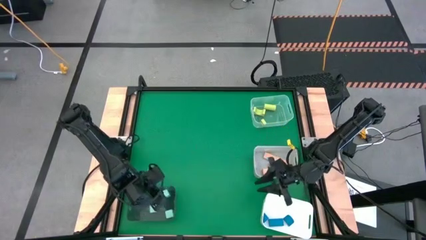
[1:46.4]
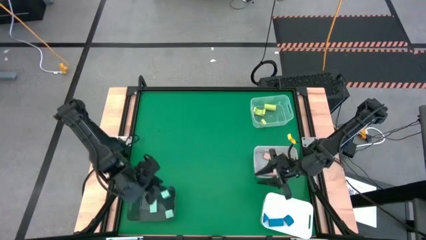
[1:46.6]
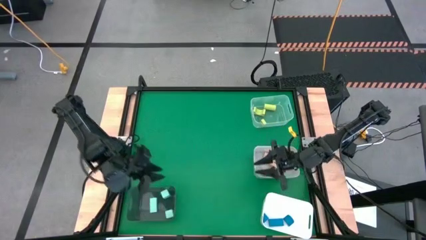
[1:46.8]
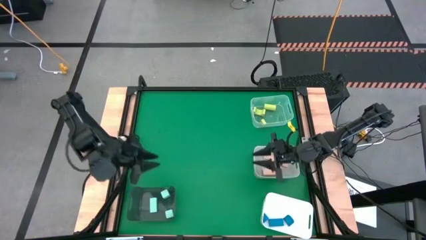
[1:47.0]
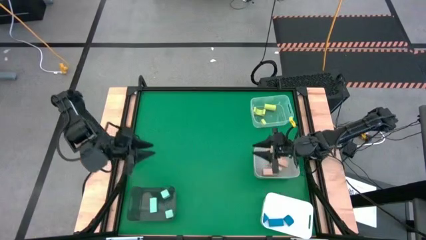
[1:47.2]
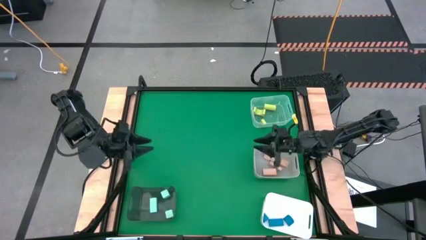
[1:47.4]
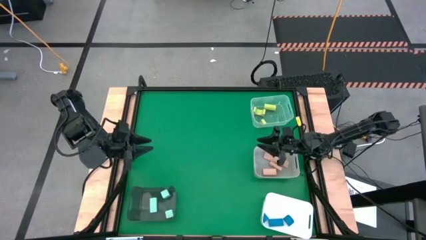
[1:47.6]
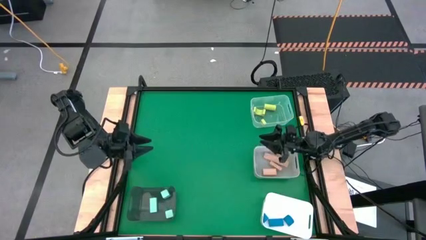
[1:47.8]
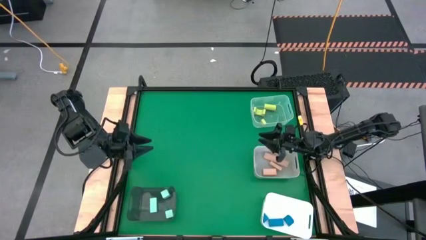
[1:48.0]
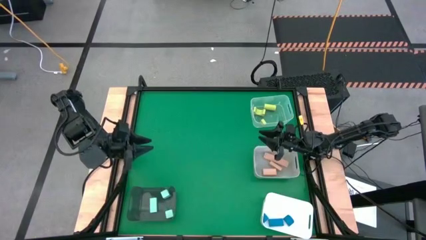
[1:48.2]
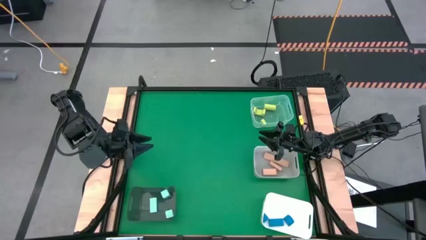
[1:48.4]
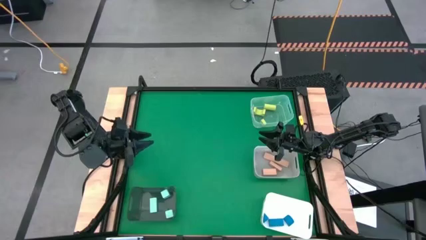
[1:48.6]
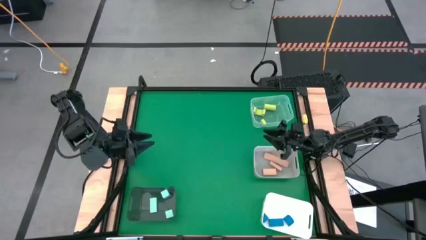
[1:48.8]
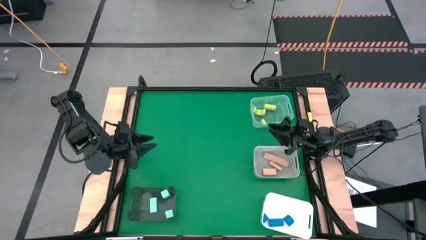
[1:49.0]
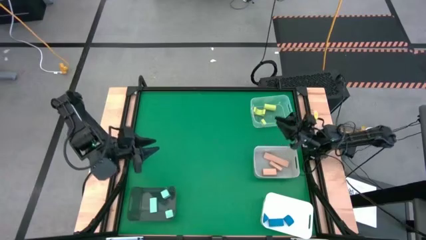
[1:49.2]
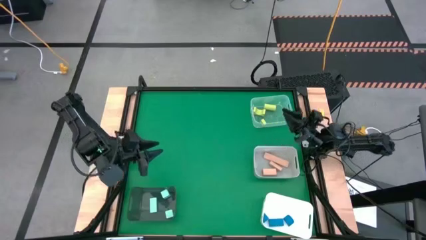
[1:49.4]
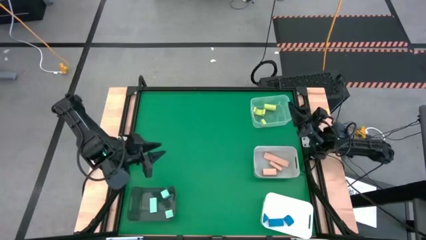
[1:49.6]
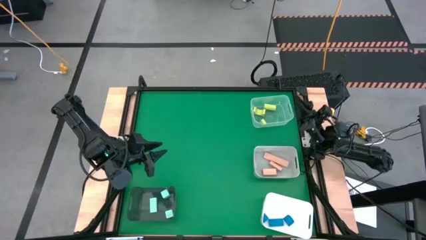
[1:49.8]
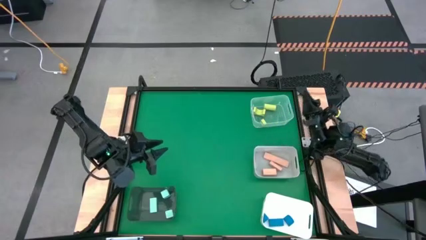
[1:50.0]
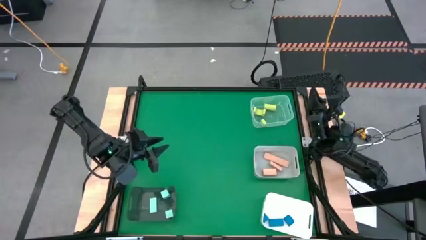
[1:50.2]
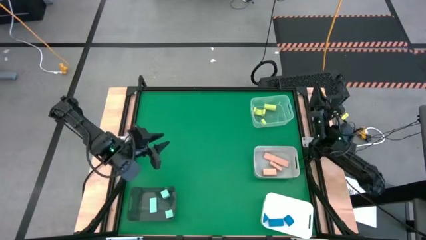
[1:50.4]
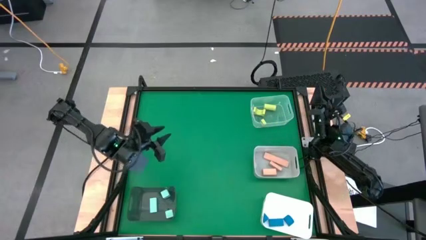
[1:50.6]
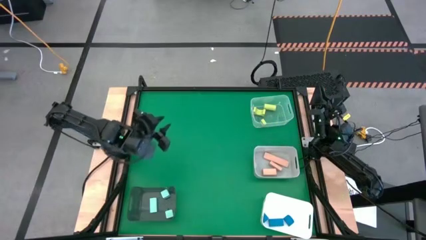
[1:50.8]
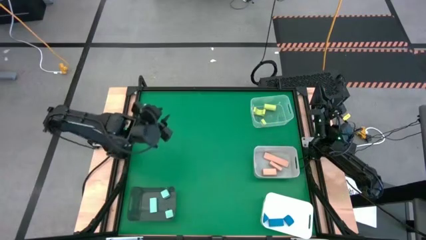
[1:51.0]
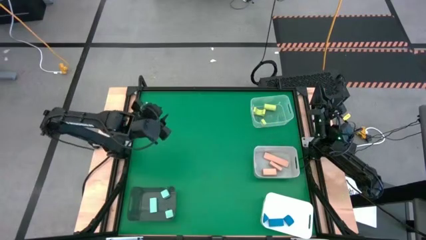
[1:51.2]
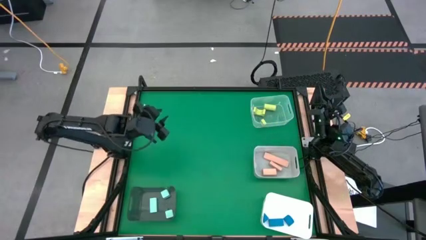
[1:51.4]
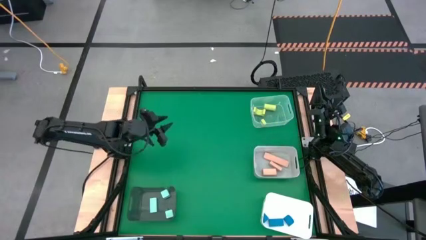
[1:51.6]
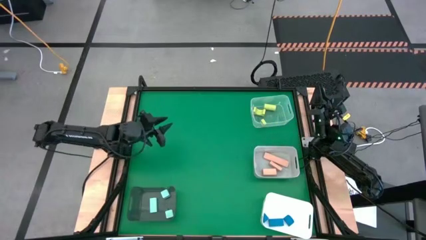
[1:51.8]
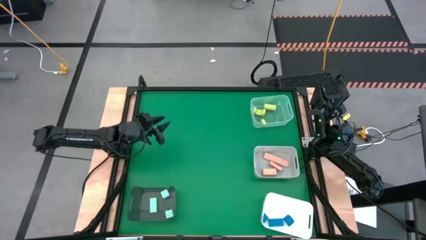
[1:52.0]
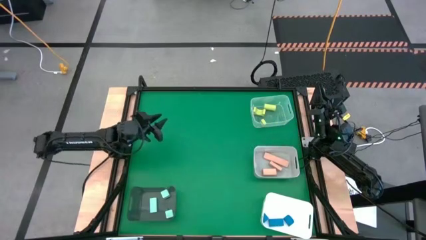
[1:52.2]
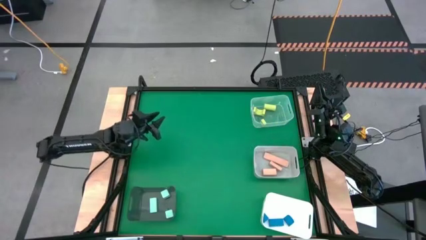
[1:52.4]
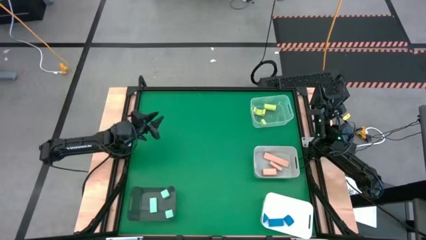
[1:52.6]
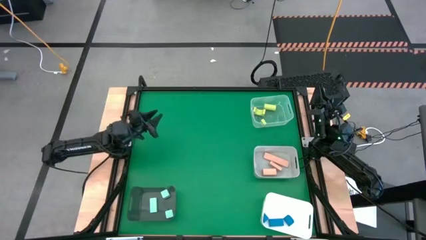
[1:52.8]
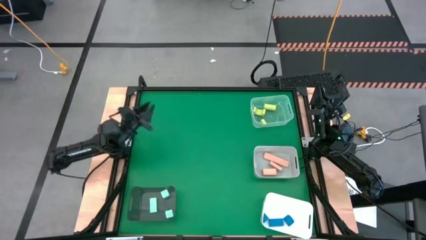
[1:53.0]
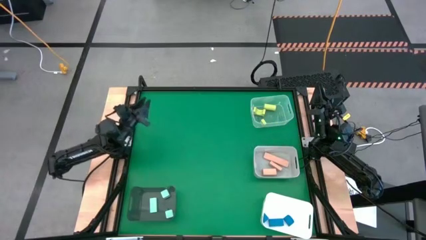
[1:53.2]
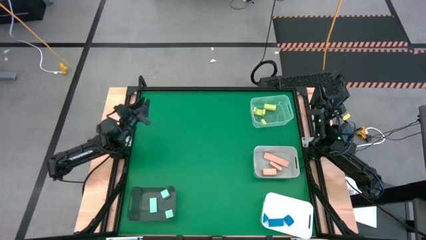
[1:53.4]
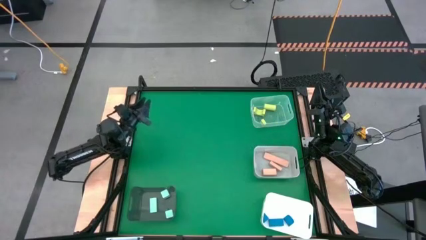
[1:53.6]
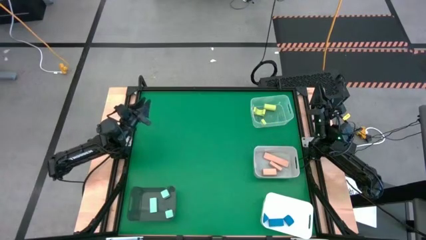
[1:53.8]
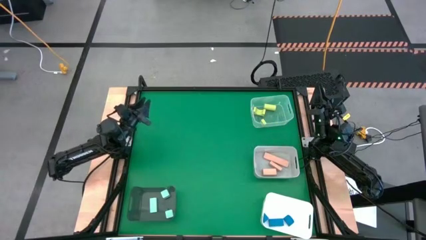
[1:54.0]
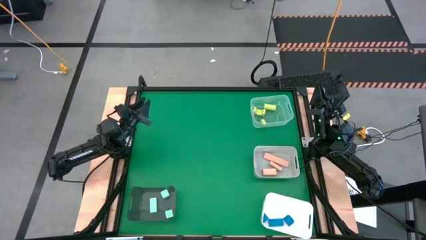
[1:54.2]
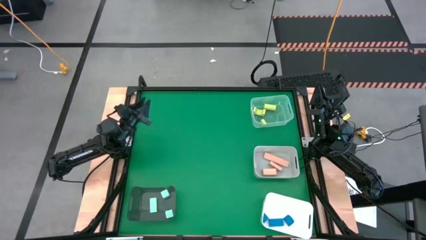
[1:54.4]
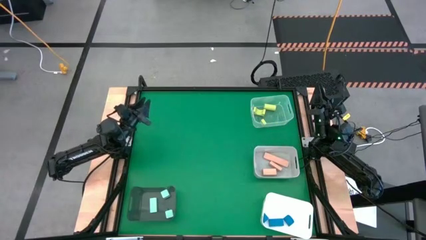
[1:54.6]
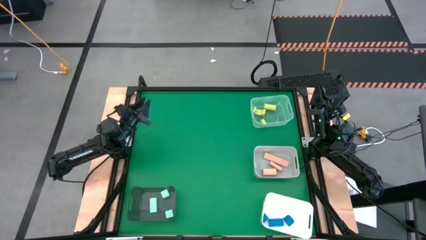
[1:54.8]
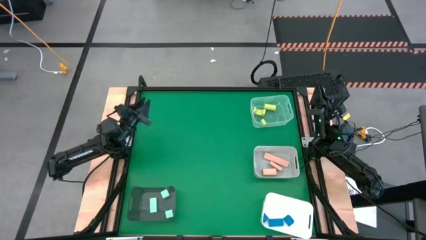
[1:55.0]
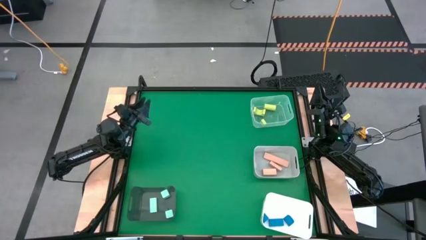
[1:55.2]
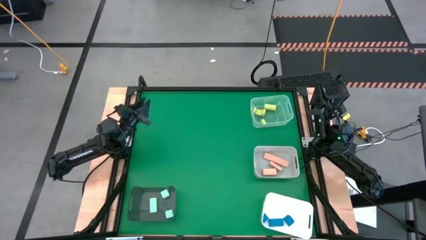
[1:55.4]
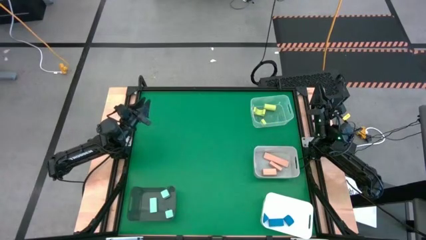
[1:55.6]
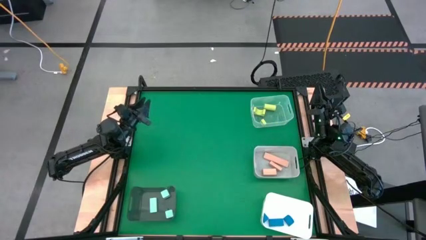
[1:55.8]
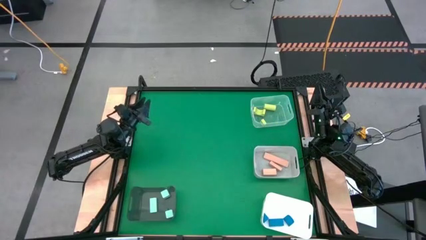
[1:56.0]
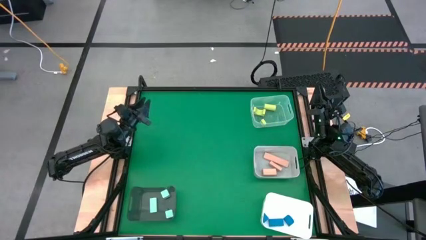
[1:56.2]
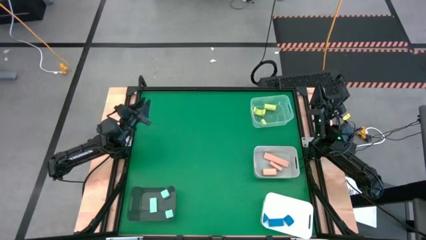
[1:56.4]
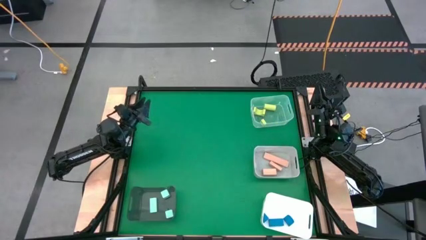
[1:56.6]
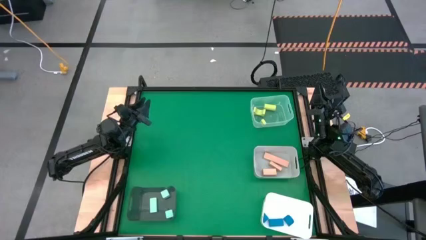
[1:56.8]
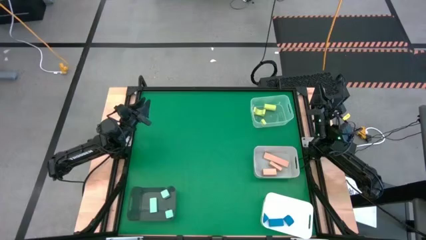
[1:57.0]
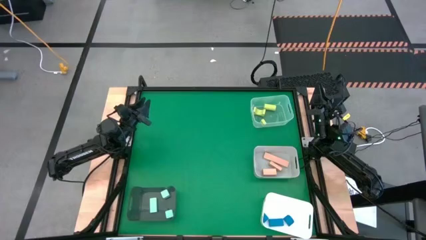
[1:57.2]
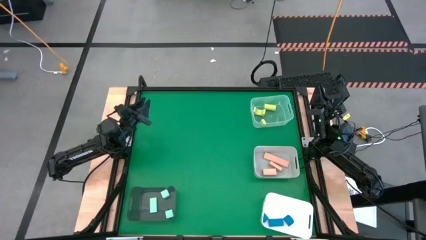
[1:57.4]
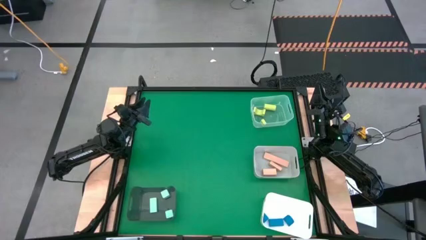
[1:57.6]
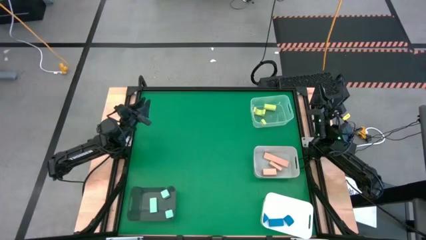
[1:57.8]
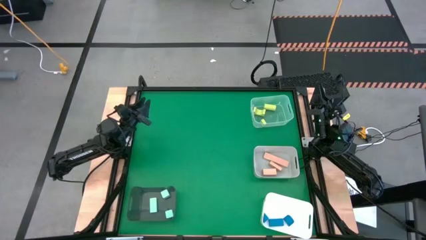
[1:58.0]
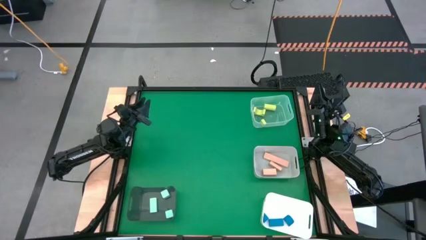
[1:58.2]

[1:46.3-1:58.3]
Task: Sort & place blocks by color
Return to Home Position

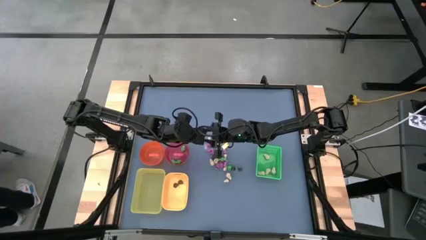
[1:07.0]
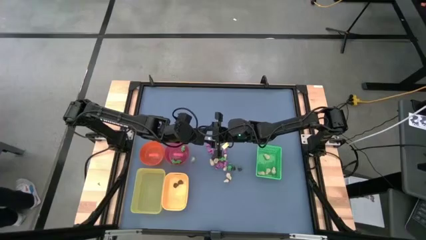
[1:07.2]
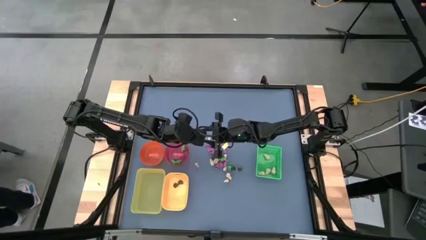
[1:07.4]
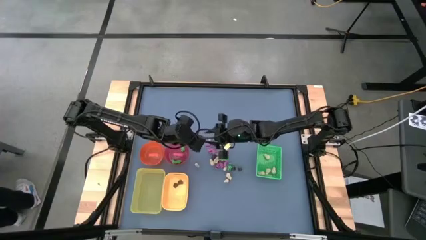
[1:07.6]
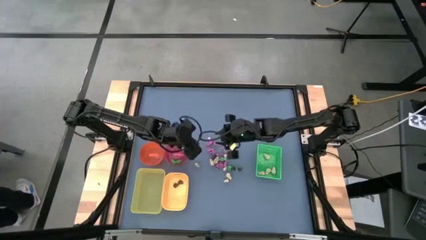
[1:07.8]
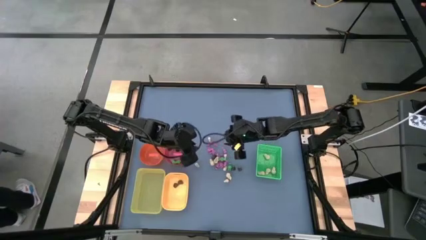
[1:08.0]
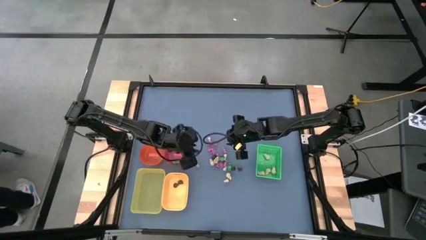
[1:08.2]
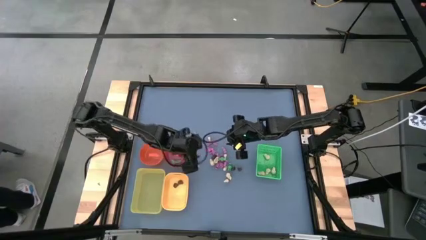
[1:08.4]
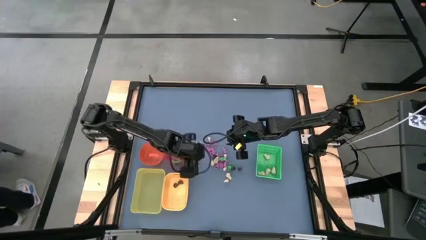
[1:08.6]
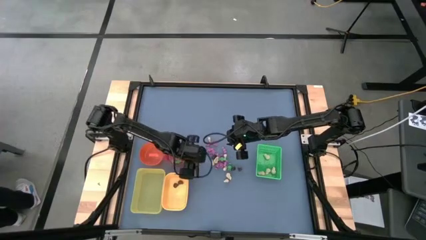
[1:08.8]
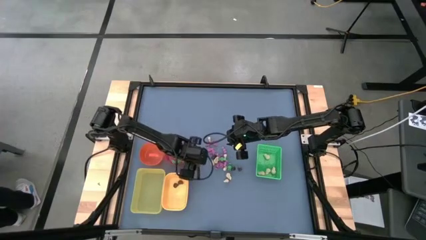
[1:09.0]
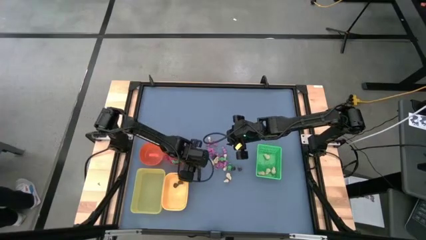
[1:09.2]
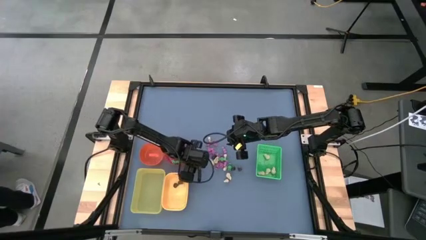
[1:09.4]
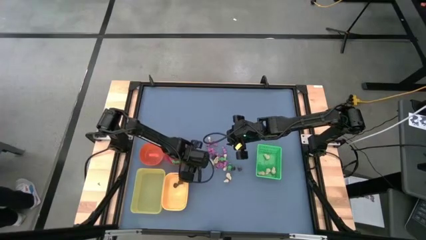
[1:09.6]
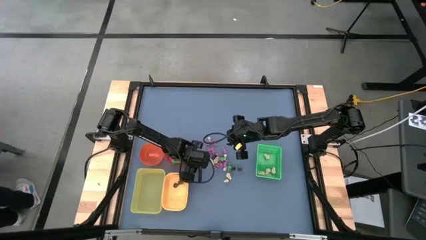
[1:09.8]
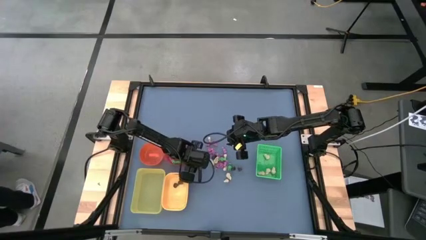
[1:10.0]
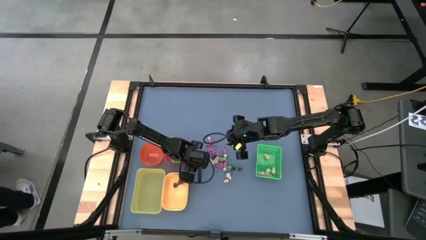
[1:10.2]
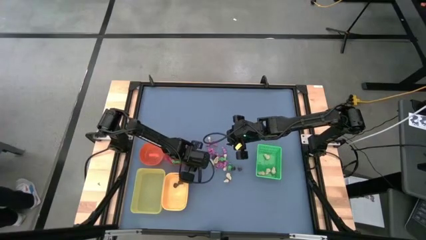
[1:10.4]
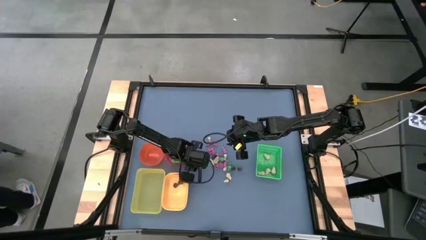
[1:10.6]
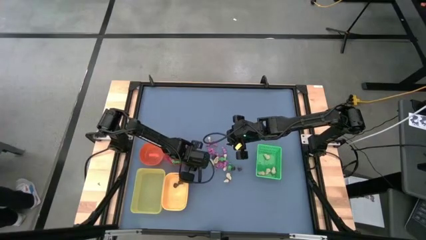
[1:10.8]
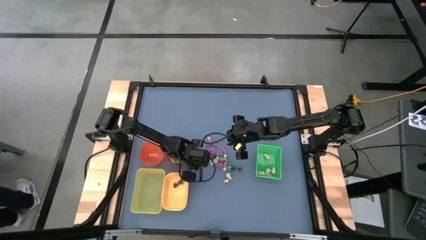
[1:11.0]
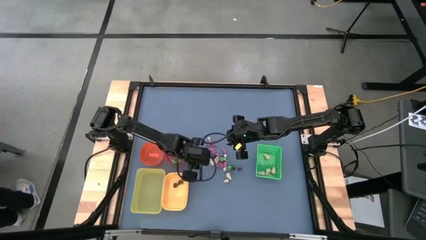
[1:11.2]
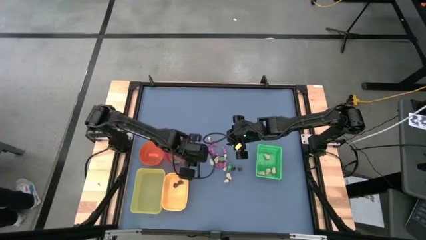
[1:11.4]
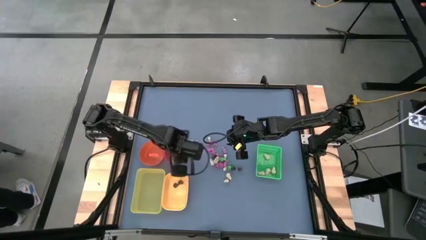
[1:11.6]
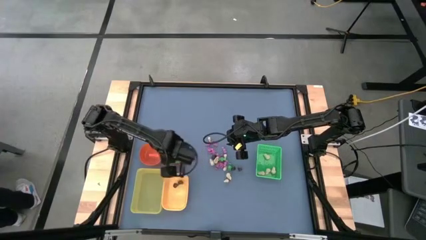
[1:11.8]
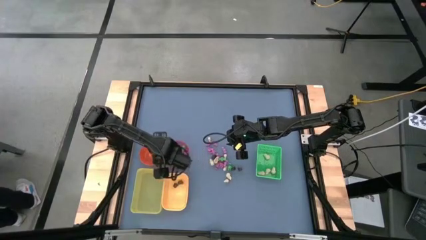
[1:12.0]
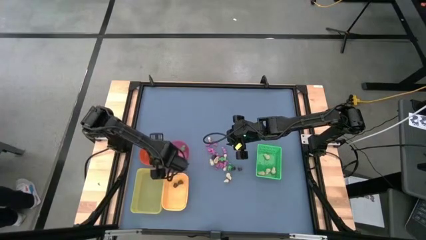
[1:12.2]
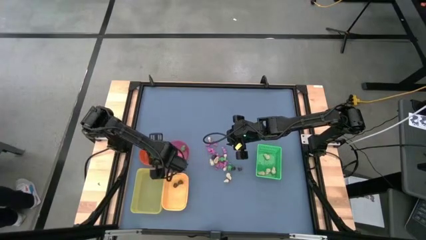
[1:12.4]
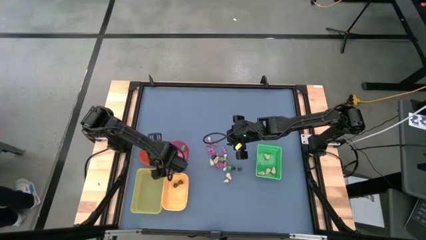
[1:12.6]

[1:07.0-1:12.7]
Task: Sort Halloween decoration
Put the white skull toy into the orange bowl
